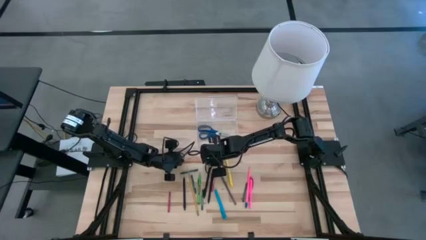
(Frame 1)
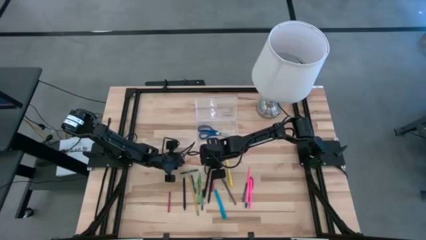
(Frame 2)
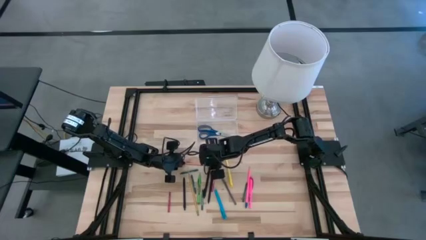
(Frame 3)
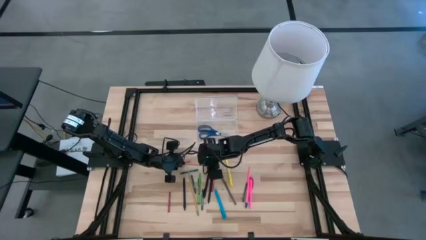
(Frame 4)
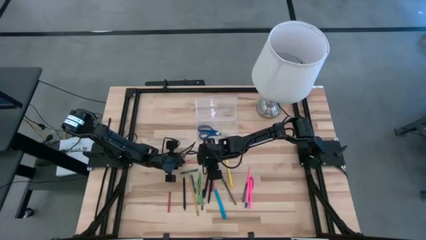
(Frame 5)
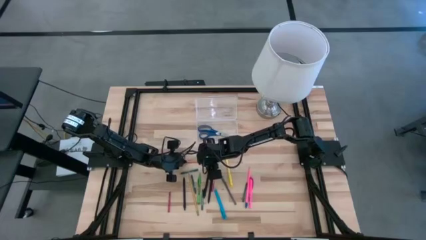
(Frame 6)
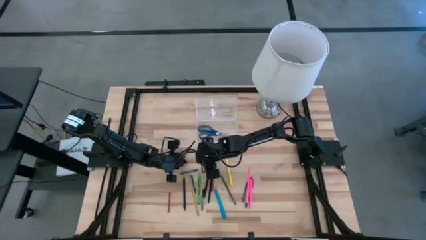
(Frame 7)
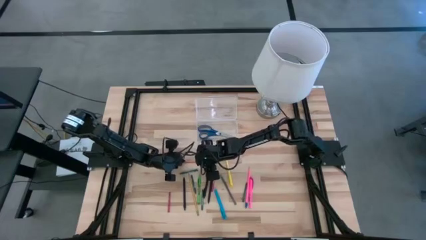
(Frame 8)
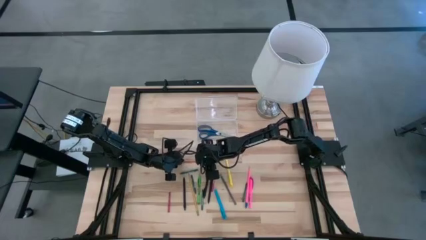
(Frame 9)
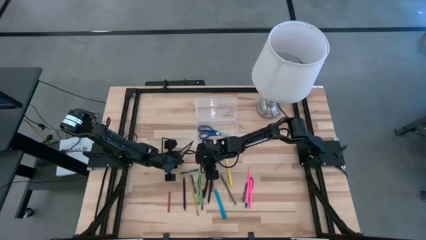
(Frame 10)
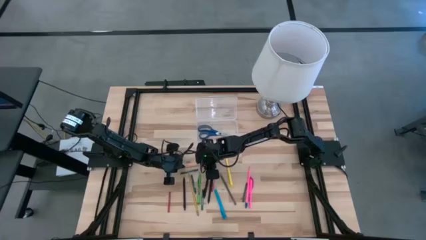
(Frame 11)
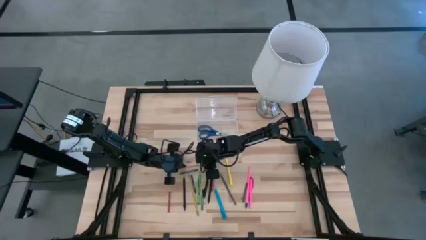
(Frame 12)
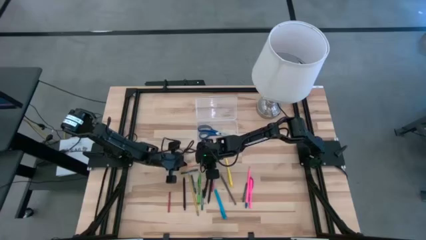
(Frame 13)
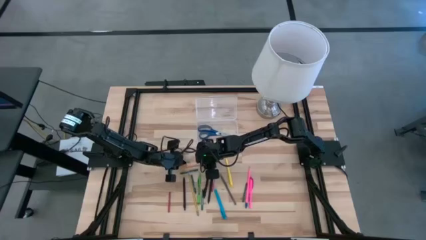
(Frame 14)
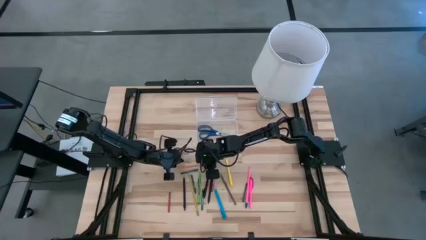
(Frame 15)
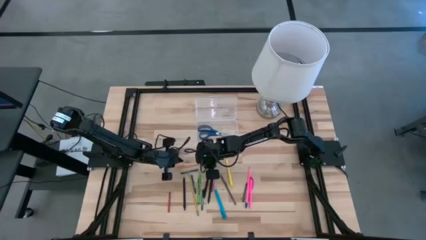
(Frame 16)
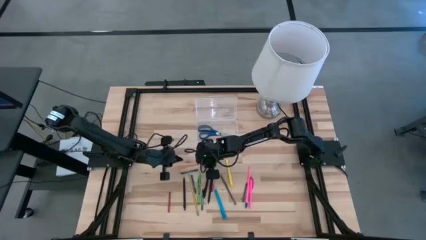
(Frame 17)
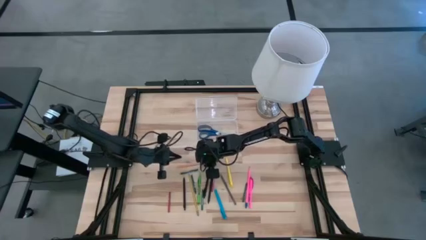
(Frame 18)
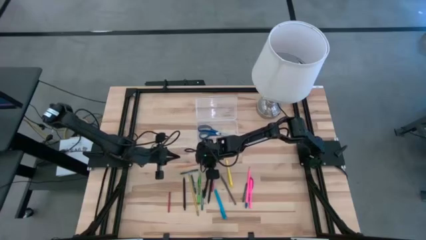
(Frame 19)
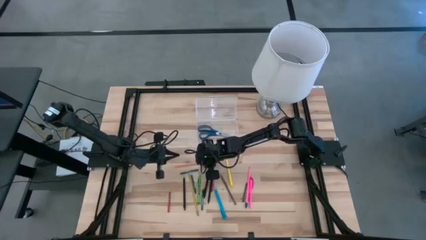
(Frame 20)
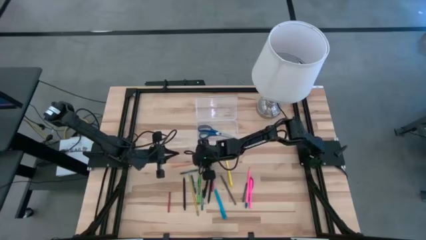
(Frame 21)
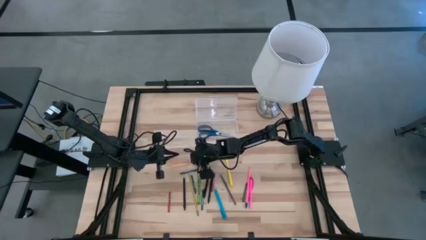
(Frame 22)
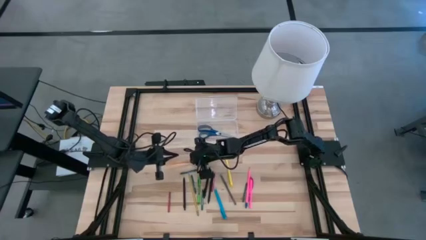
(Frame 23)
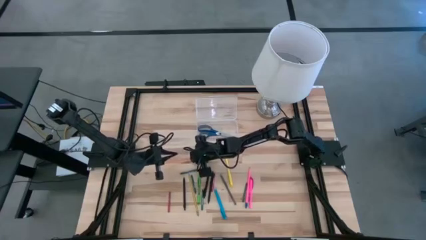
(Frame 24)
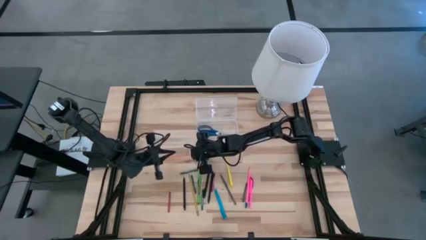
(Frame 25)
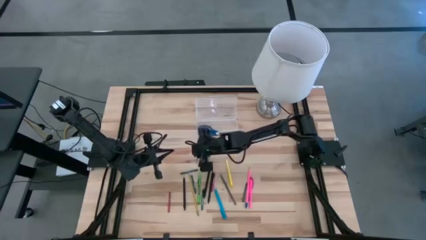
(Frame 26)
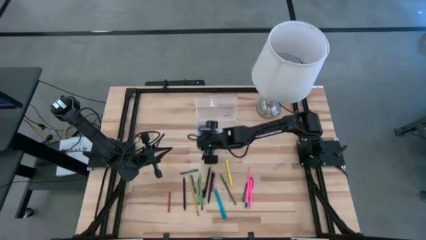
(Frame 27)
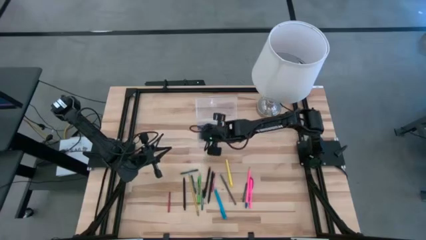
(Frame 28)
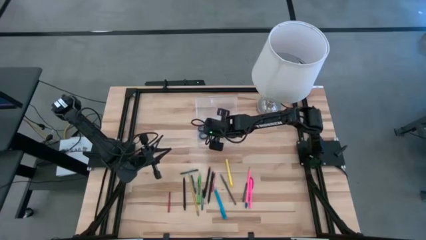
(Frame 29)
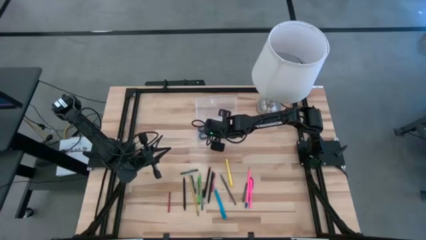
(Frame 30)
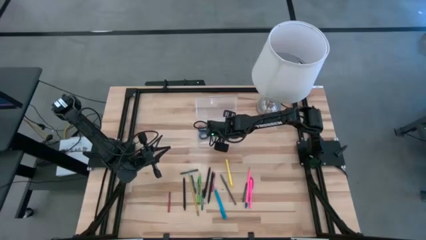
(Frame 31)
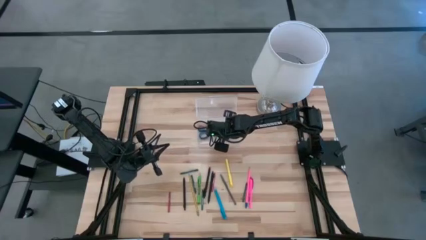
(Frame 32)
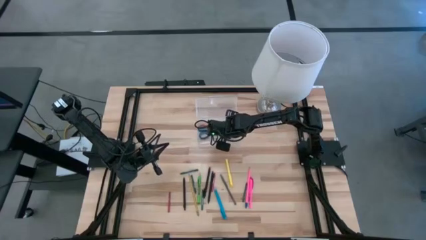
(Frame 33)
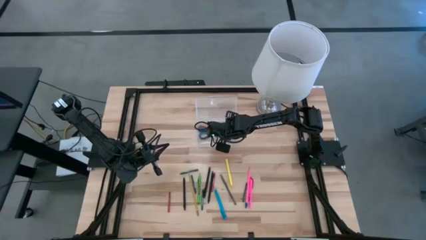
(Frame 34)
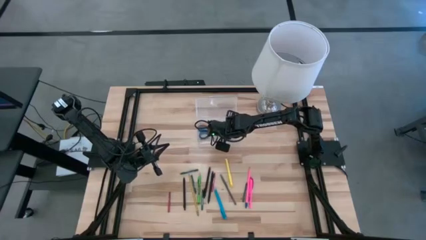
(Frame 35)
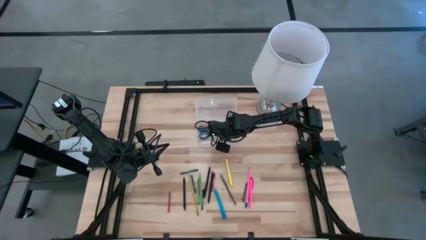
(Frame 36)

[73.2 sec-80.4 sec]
Task: Pick & place school supplies into a supply box
Put the orange pencil into the supply box

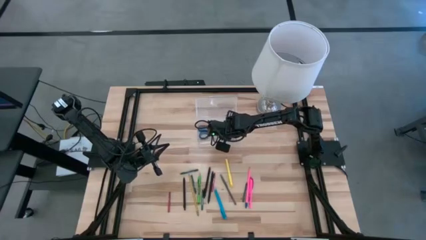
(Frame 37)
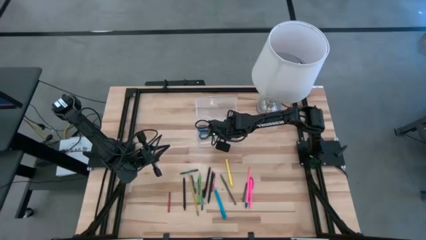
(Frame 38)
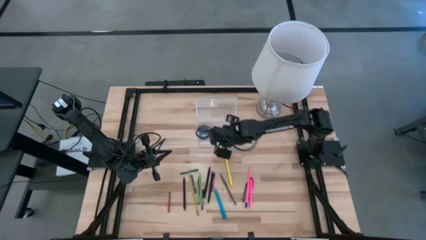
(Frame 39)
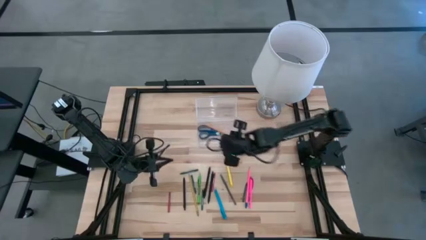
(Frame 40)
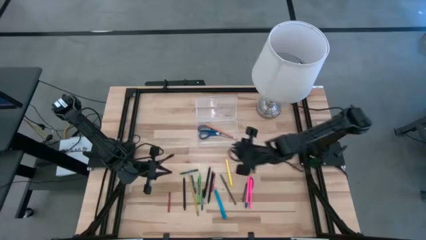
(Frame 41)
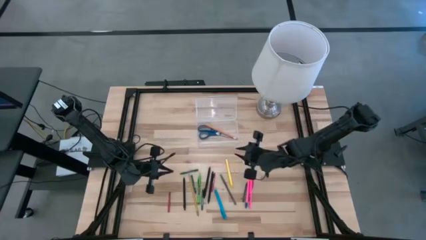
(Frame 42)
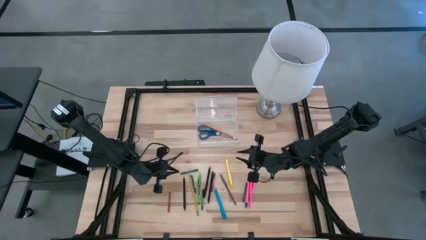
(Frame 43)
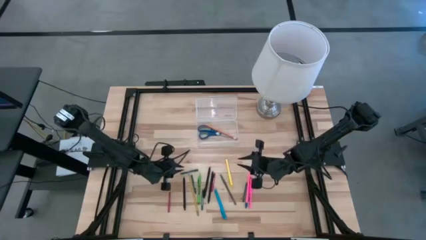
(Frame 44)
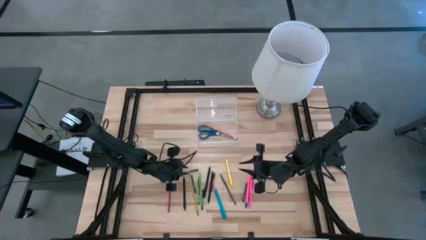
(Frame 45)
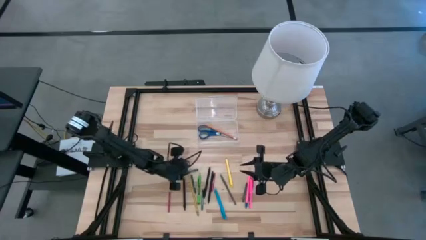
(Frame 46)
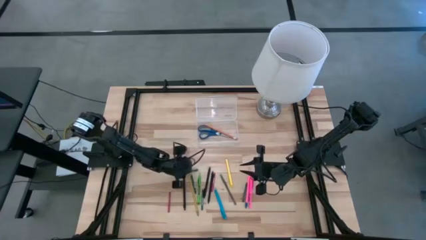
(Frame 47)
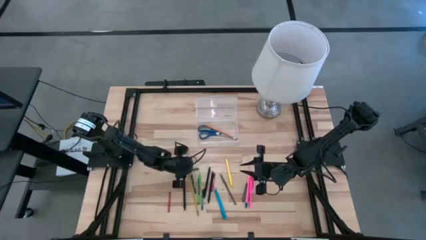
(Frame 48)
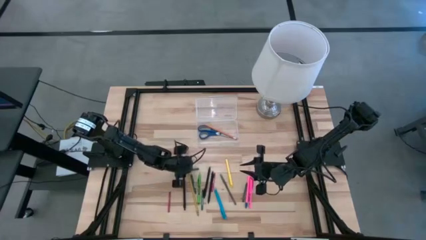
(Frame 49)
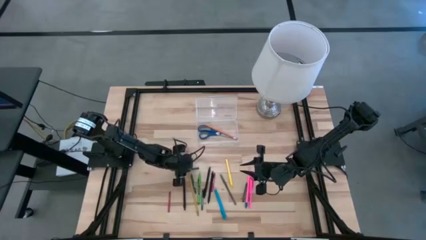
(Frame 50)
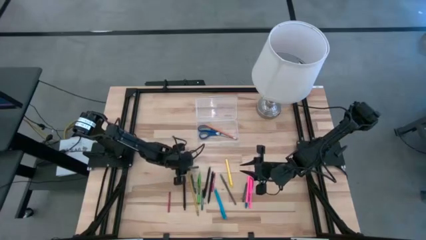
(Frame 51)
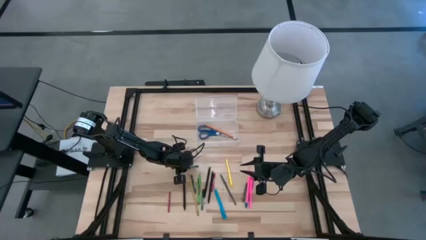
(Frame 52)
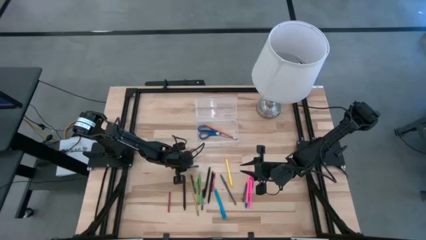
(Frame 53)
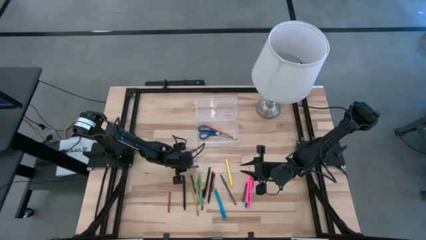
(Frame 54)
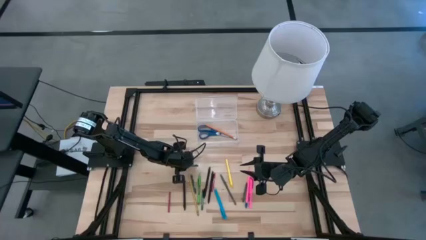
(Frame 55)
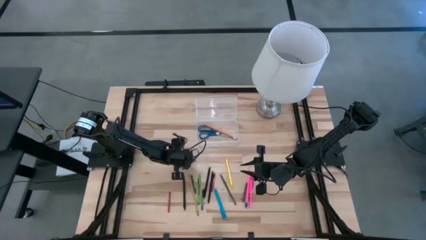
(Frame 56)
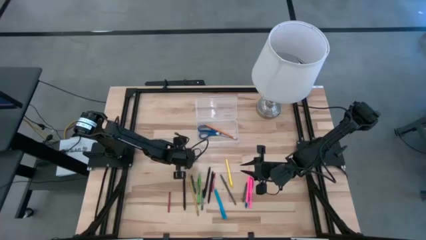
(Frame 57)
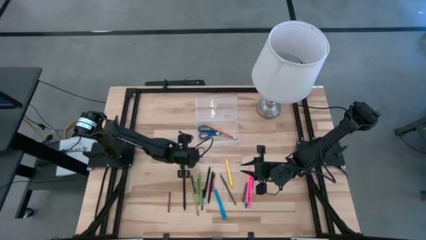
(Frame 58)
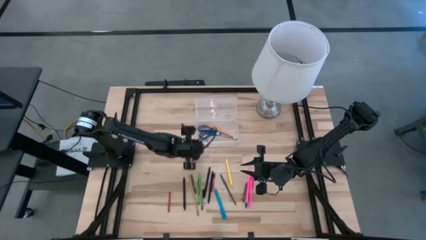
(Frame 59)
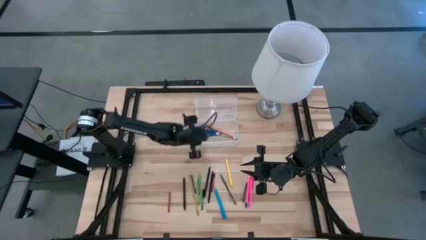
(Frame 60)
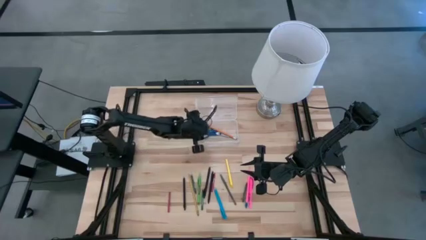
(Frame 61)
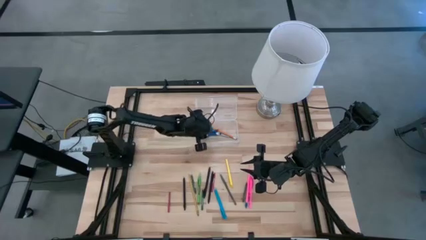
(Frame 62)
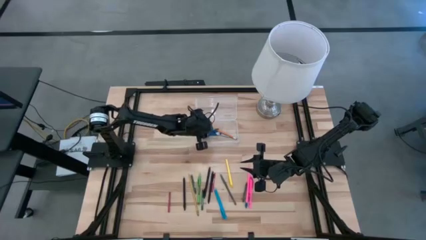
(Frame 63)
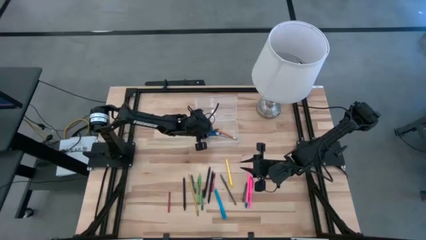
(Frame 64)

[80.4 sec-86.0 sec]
Put the top green crayon into the supply box
